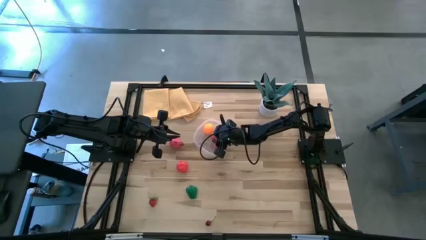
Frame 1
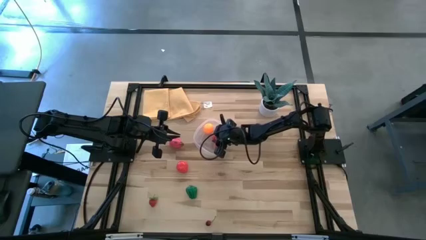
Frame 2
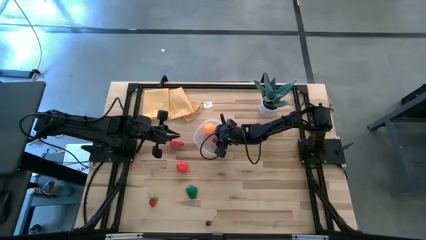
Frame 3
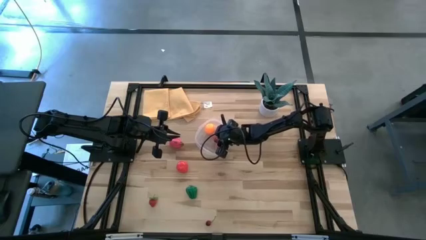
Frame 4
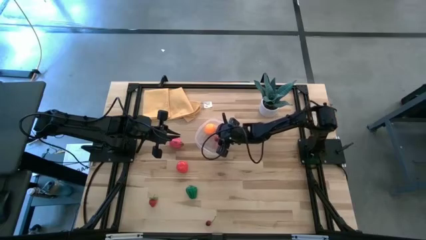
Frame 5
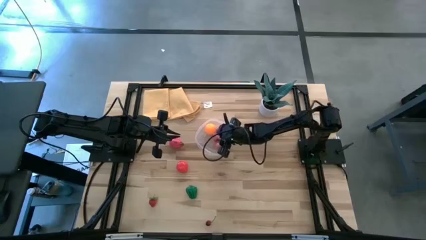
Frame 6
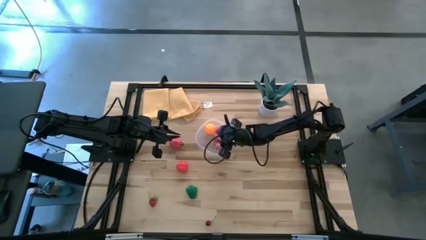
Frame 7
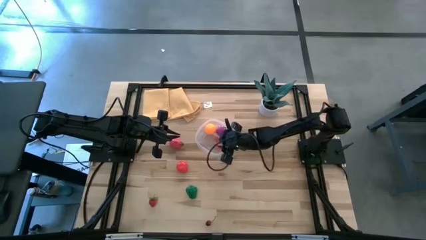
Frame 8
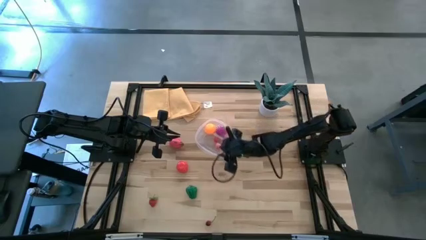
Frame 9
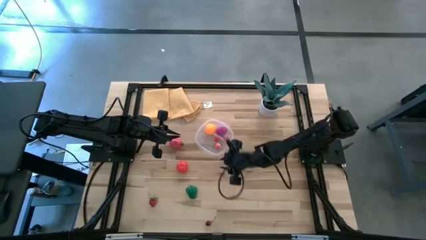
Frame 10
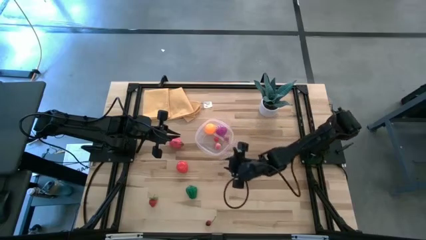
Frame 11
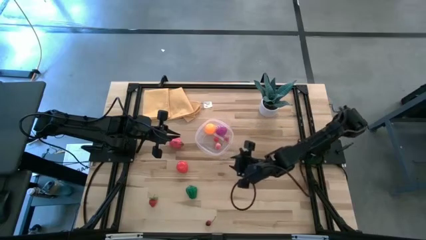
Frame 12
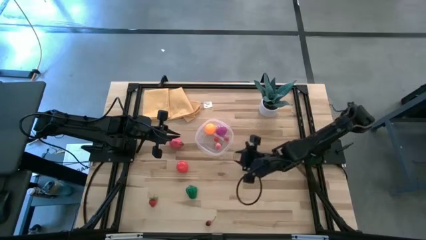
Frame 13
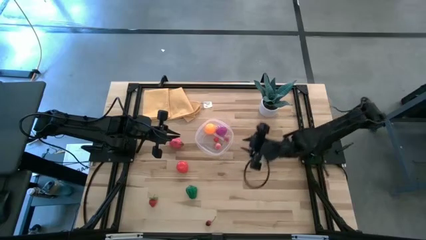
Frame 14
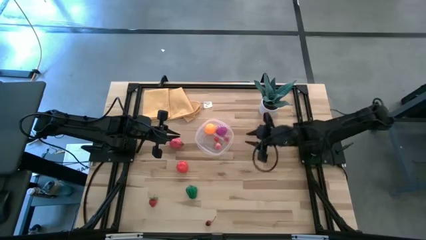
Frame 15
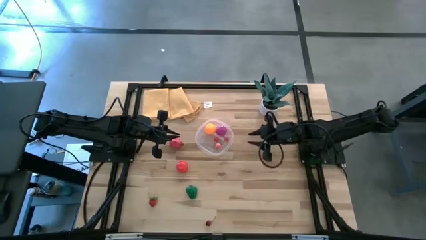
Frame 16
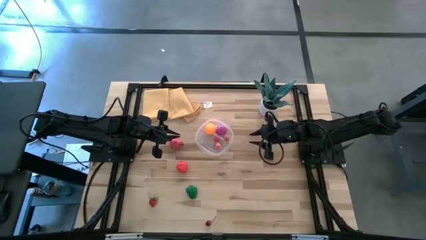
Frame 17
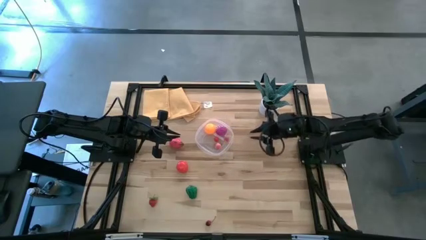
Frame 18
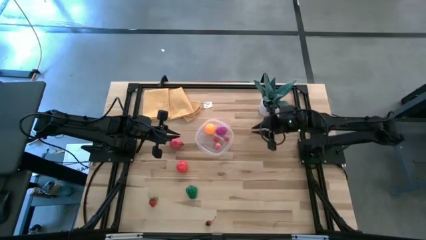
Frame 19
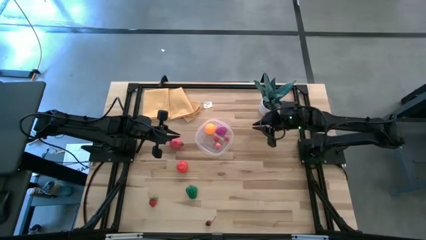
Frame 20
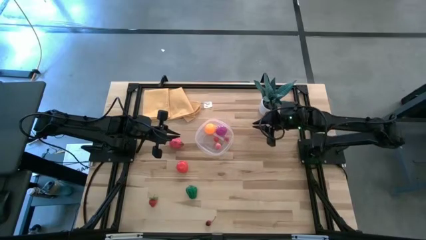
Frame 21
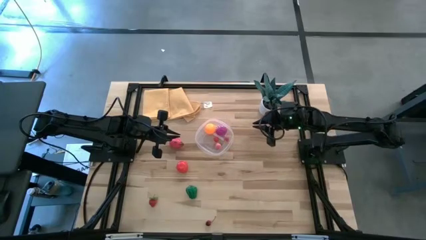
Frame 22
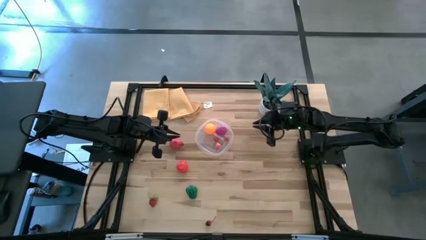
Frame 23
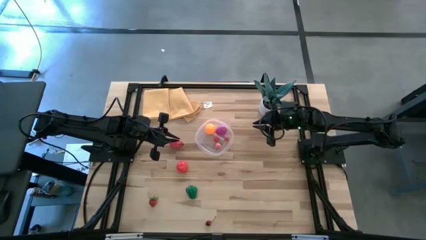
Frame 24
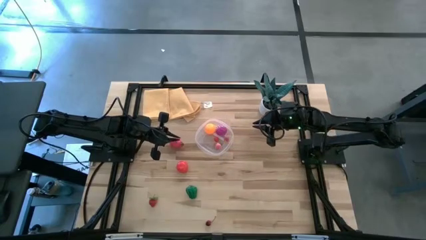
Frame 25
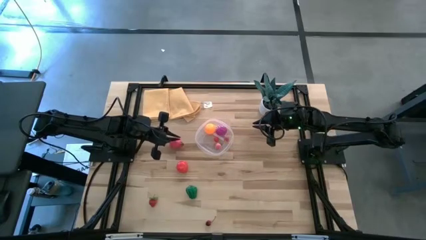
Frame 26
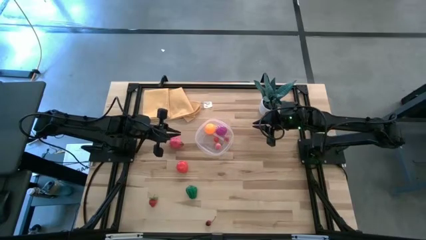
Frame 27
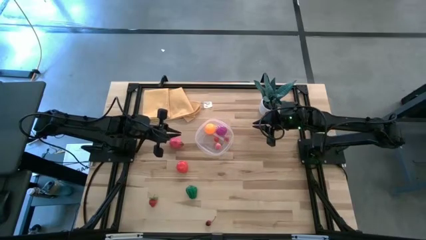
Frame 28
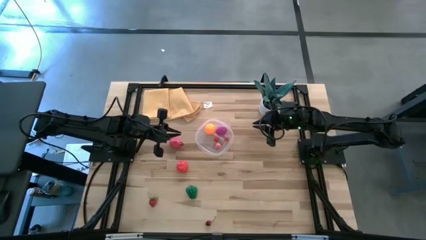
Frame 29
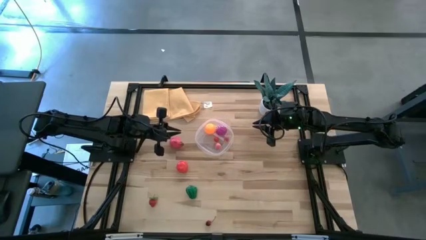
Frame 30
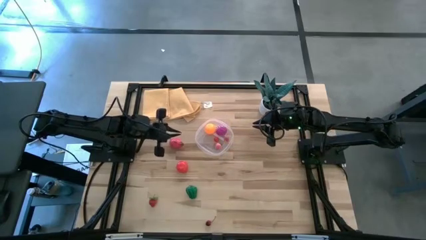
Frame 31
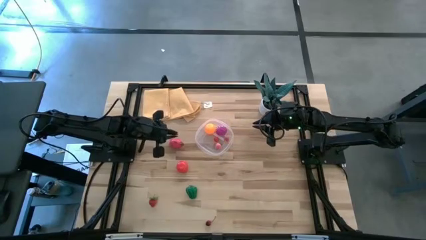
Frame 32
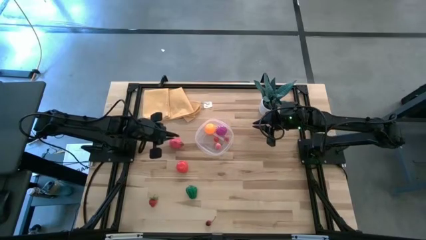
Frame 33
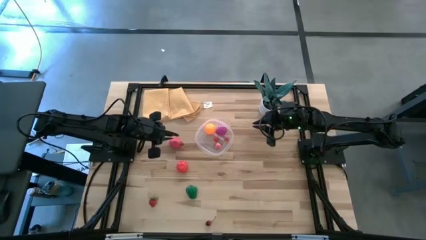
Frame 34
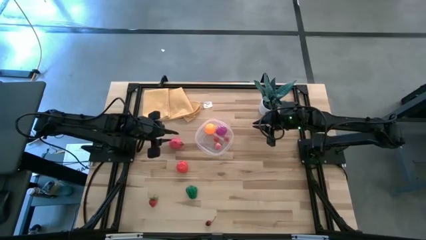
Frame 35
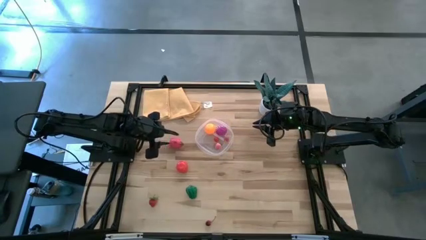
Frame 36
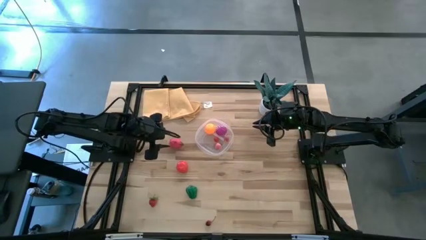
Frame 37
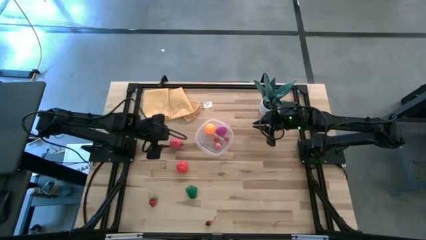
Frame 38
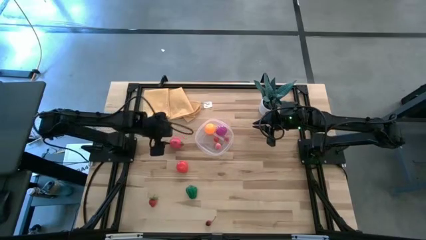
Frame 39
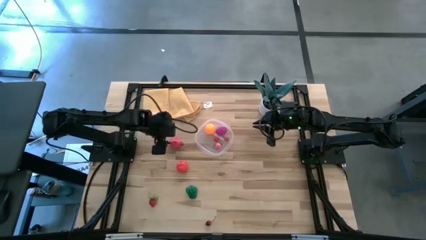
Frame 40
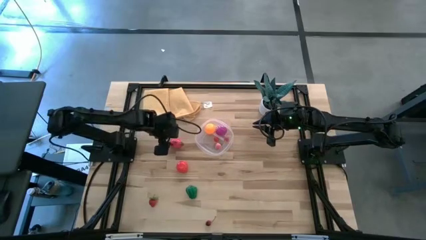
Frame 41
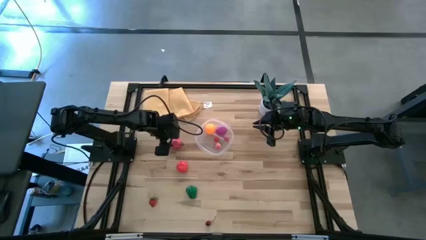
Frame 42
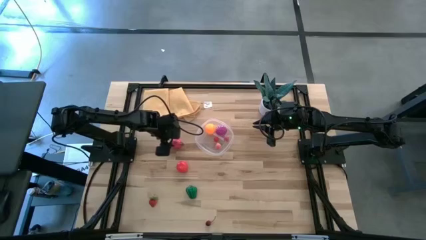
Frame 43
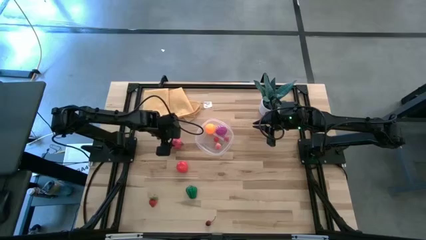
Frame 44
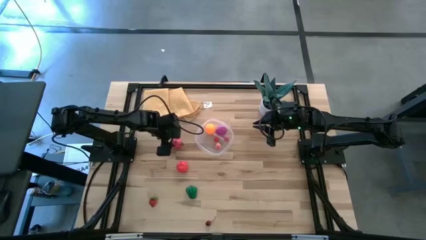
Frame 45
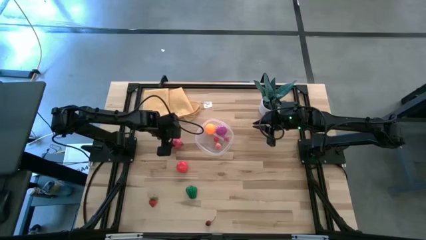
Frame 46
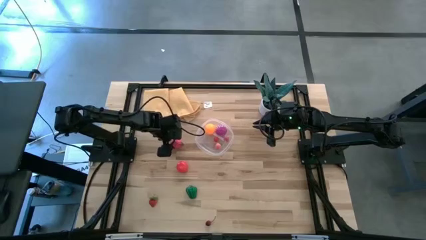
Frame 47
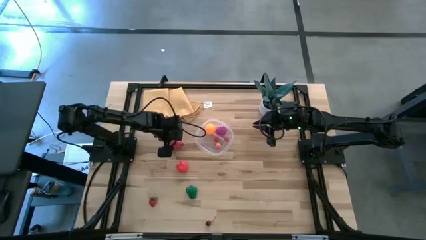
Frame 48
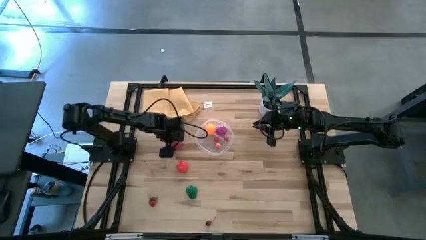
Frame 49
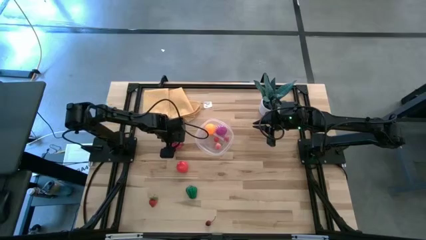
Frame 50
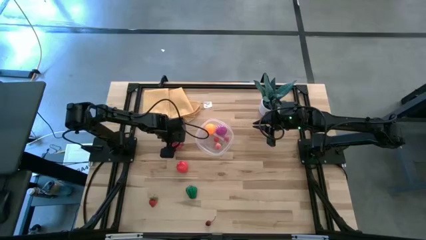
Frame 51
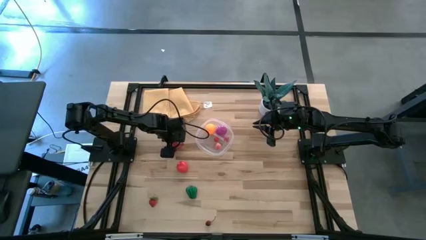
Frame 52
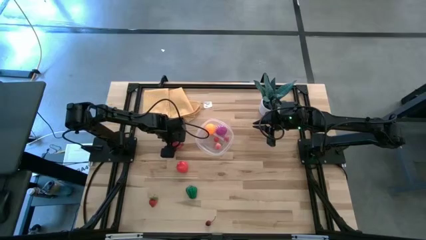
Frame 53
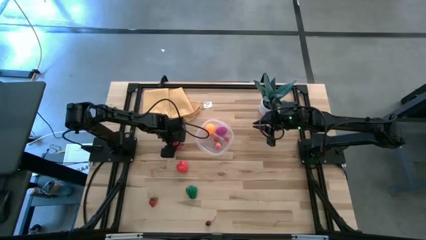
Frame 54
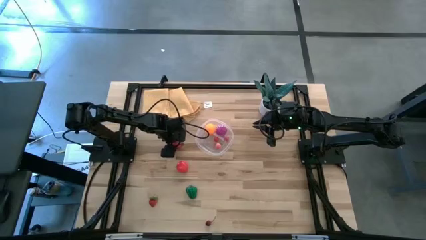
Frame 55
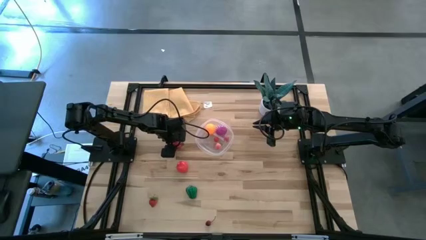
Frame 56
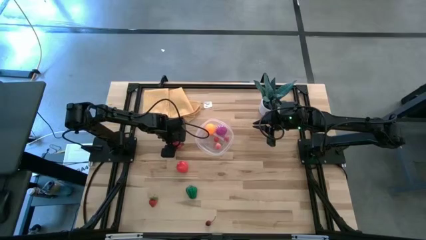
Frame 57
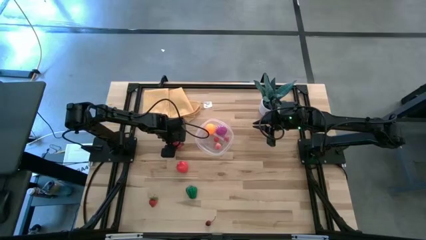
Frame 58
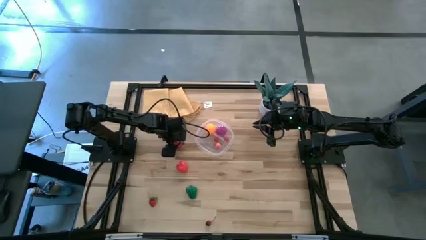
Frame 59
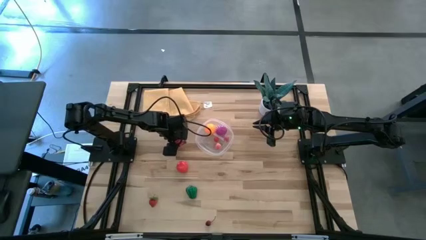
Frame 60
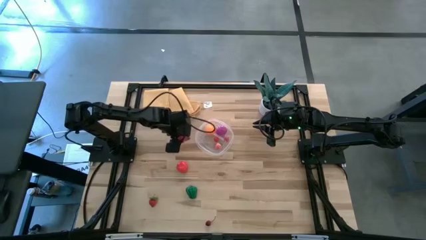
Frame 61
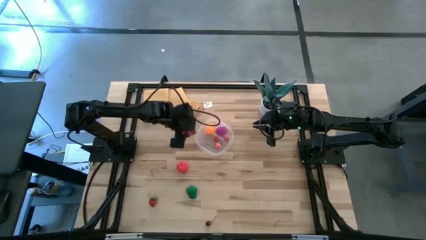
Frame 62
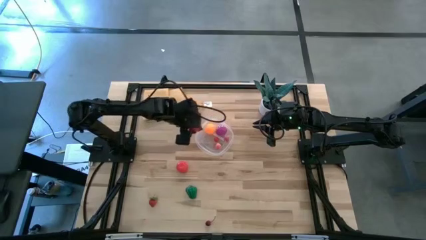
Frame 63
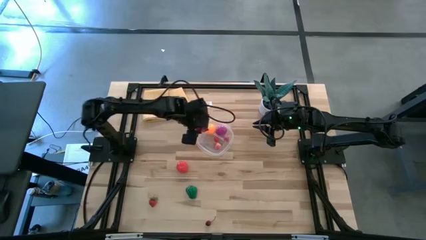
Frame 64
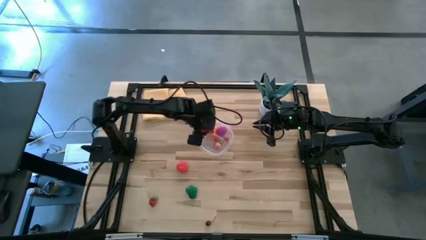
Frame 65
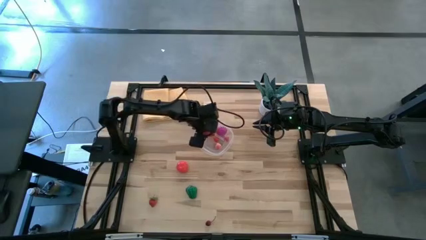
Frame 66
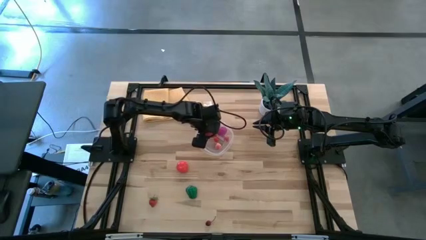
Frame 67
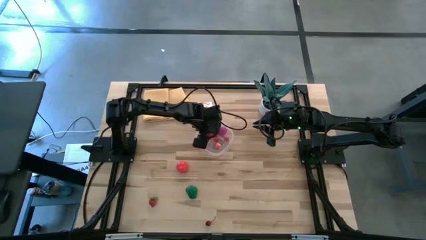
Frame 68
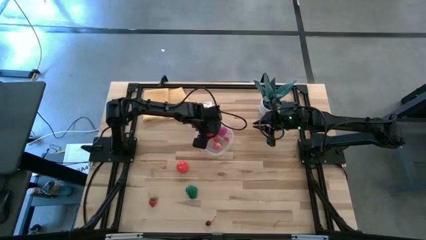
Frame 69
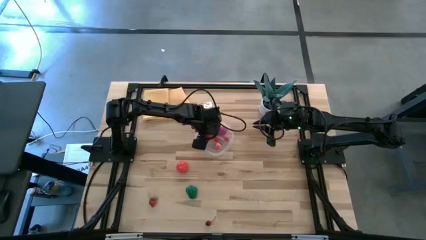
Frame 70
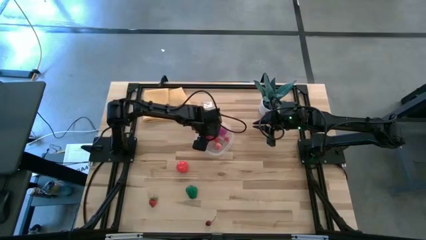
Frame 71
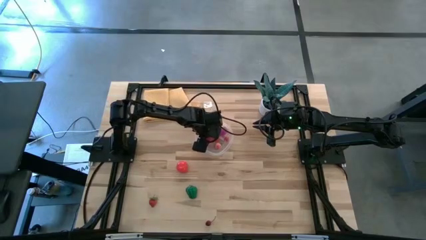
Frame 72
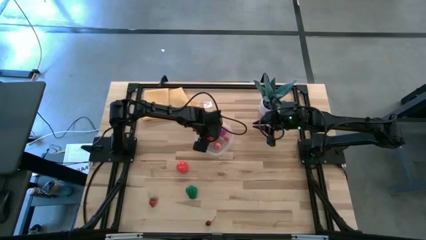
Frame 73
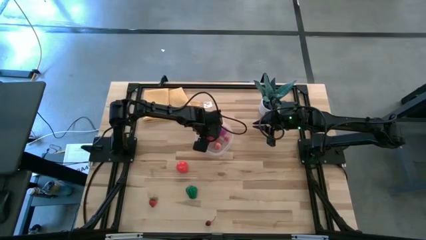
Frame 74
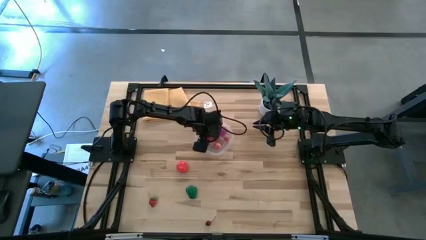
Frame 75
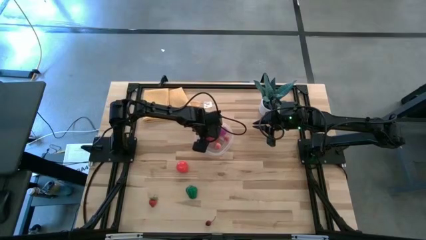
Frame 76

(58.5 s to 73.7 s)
Task: Pick and placing Produce into tupperware
Put the dragon fruit into the transparent bin

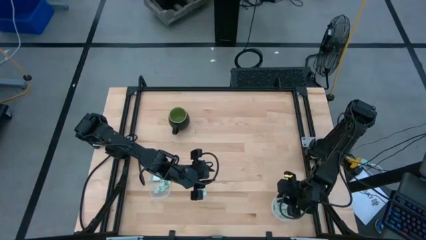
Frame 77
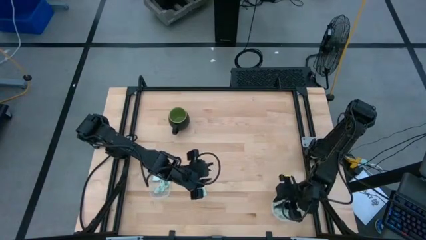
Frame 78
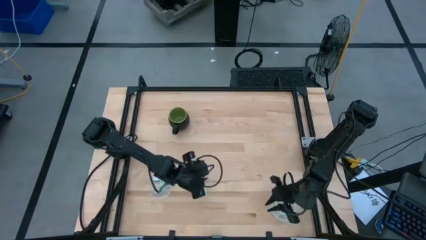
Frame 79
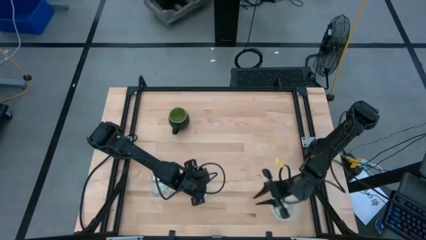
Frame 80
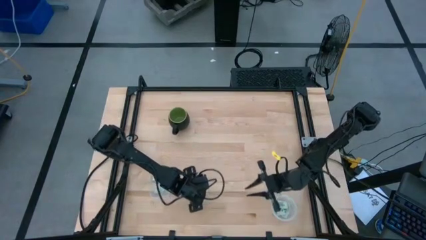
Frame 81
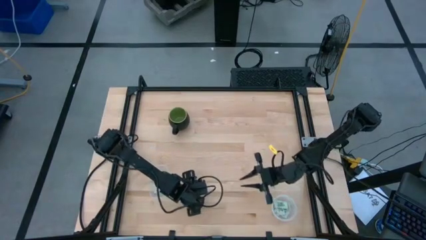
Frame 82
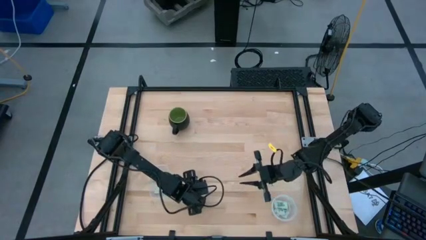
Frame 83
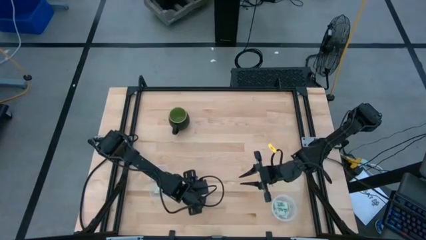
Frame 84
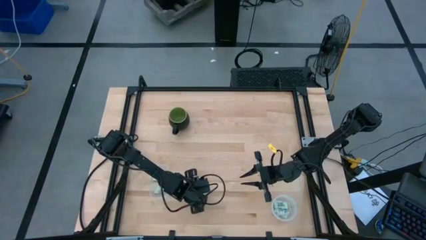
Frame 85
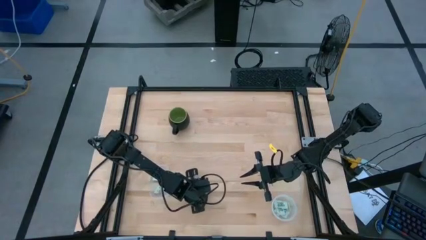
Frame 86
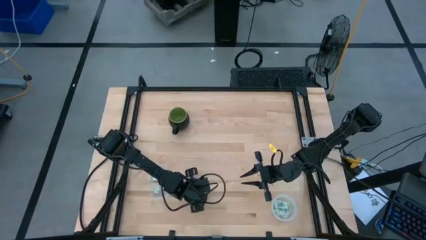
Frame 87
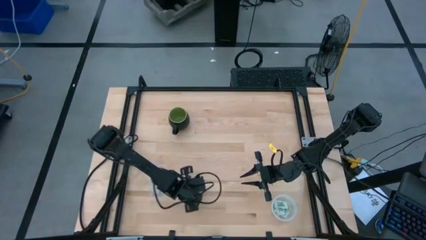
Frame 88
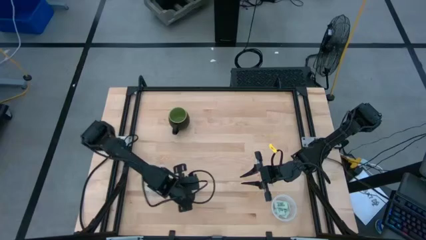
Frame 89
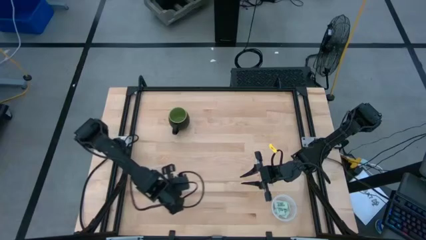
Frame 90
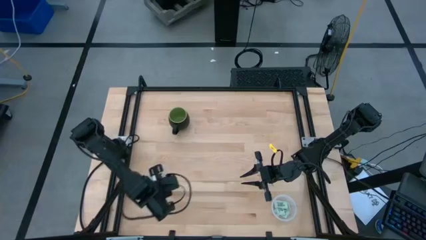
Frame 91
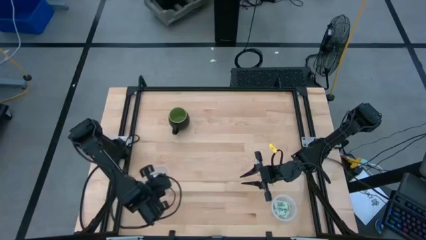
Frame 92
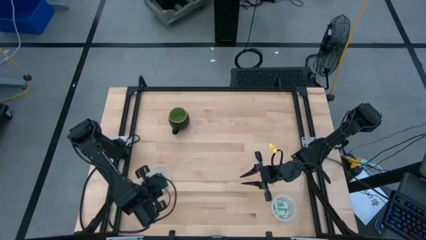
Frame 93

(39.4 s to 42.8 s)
Task: Pick and place Stevia / Truvia into bins
Put the Stevia packet into the top left transparent container
